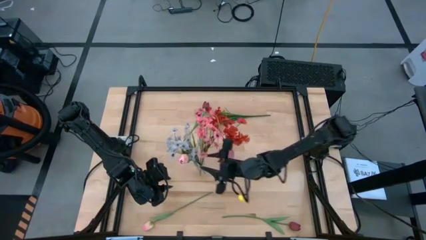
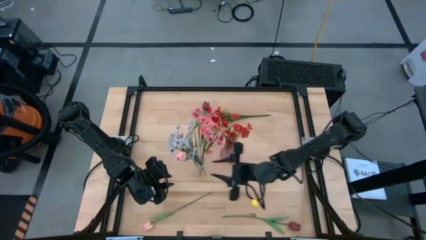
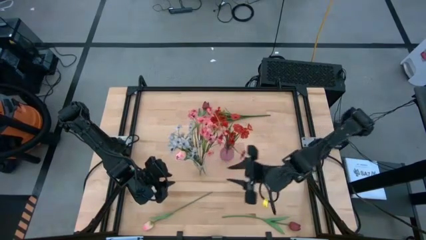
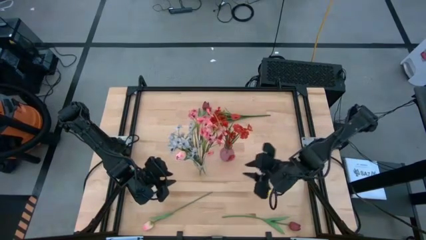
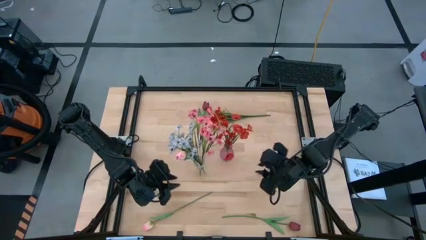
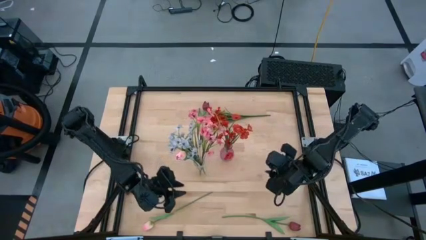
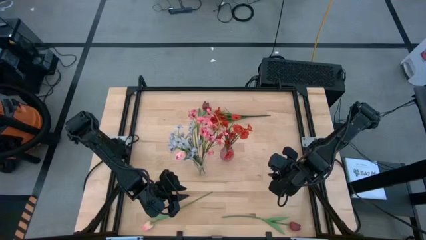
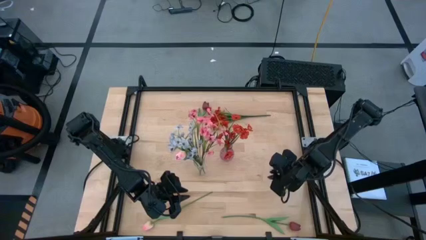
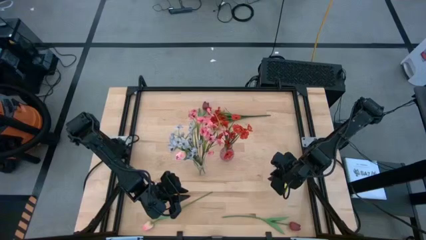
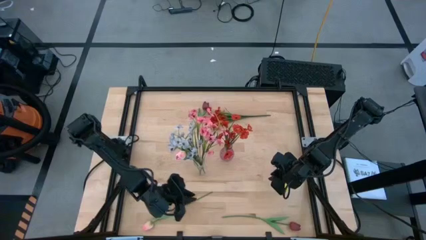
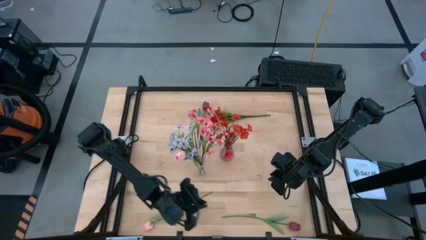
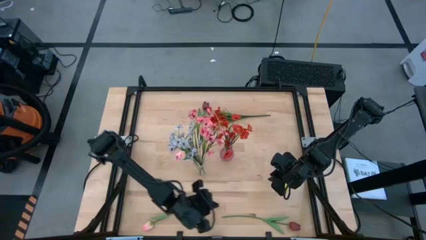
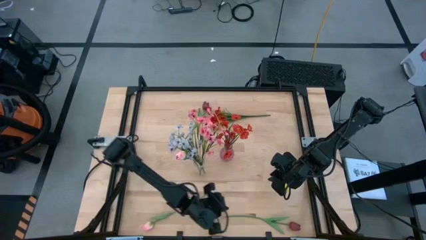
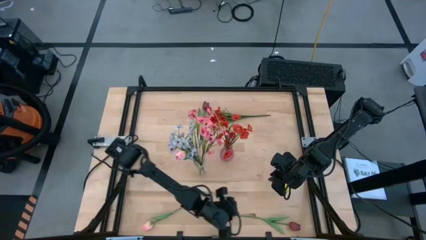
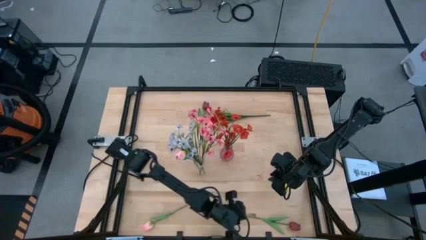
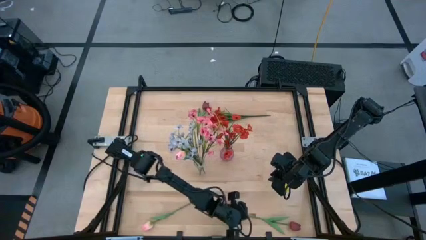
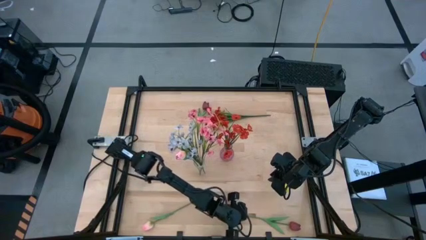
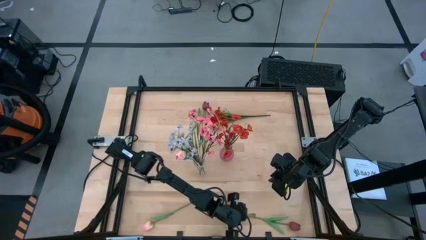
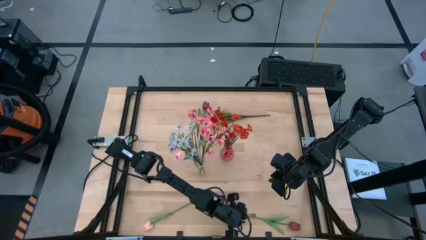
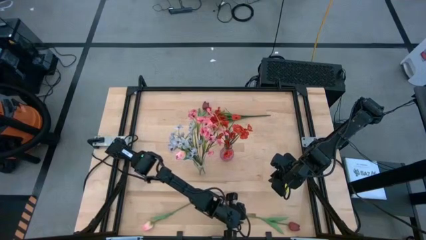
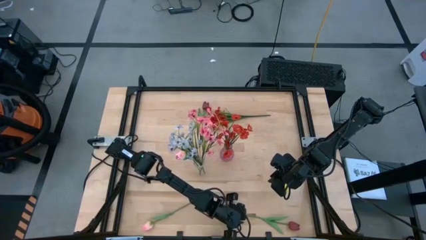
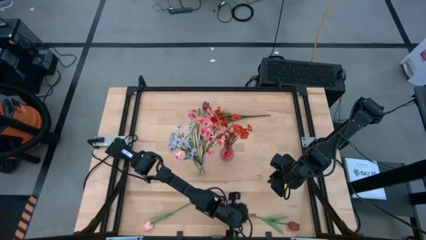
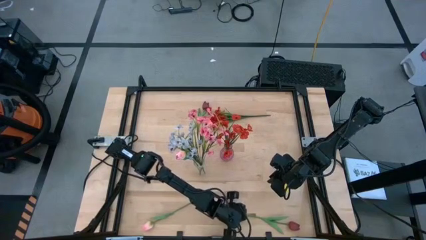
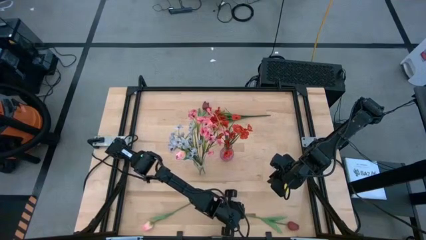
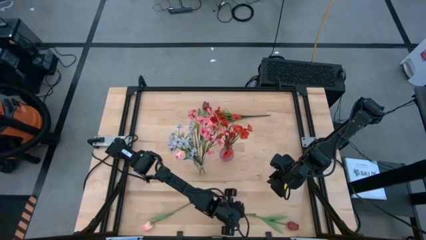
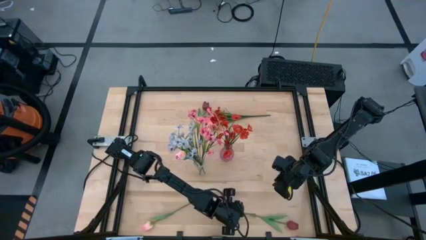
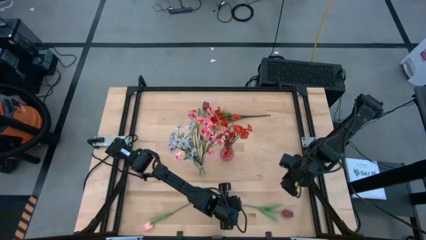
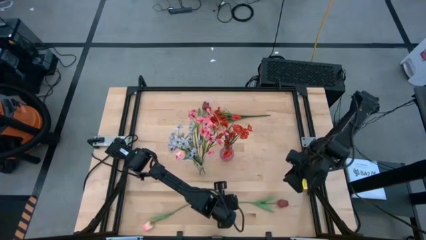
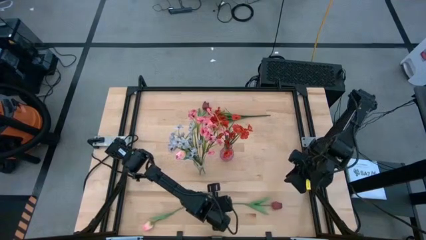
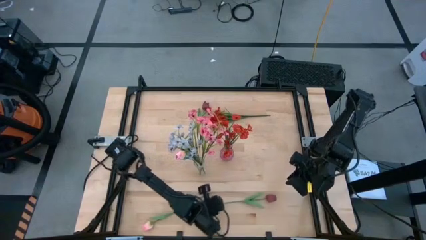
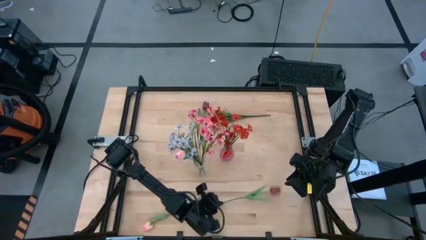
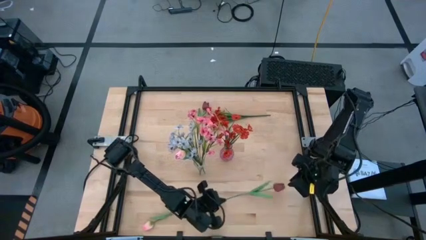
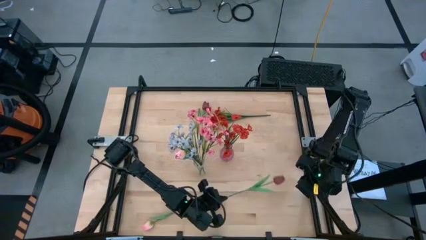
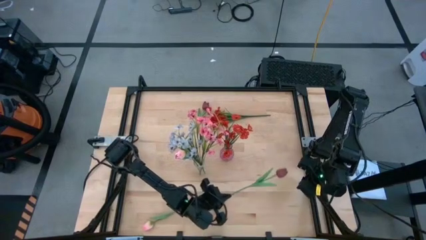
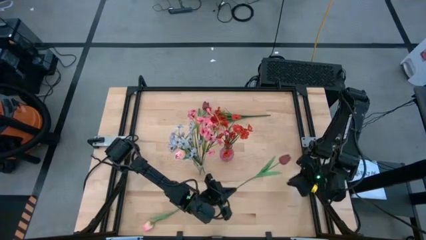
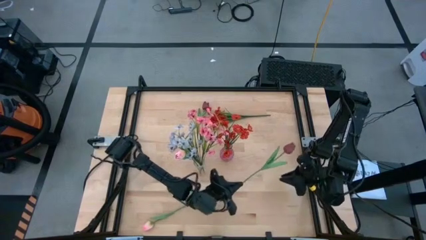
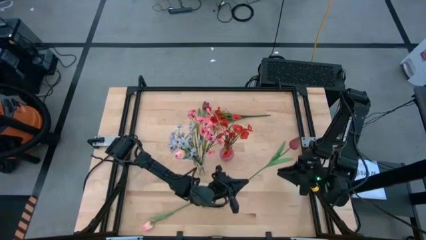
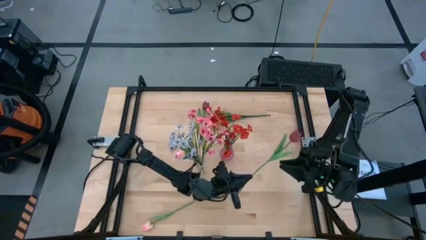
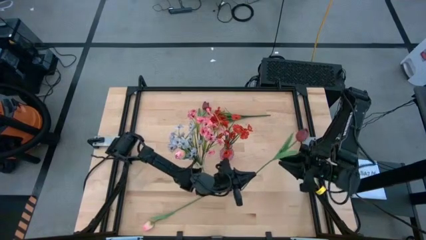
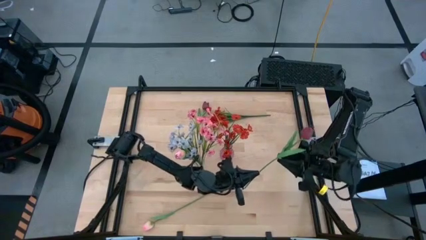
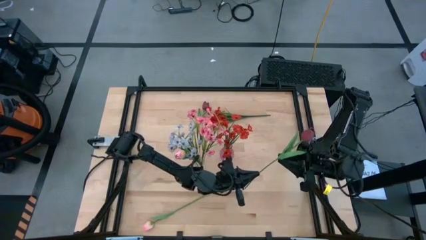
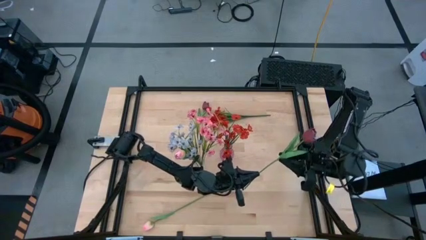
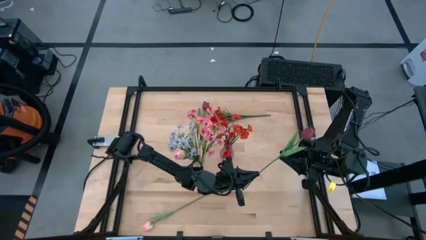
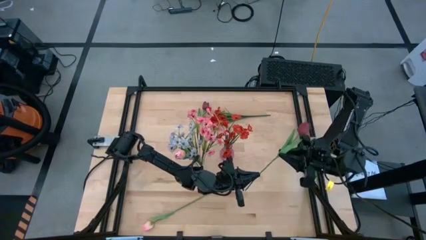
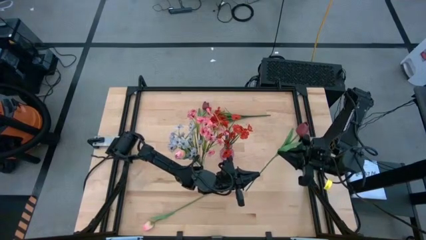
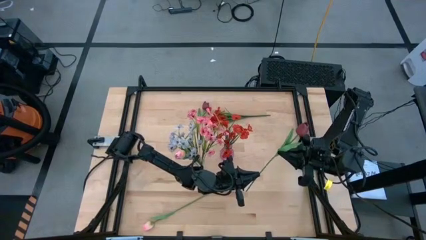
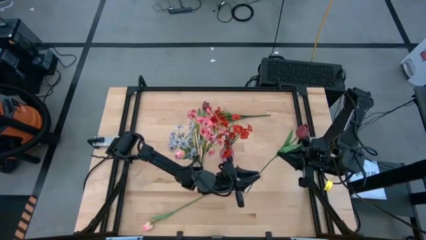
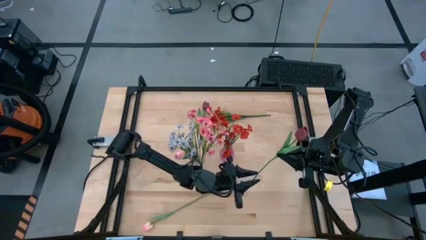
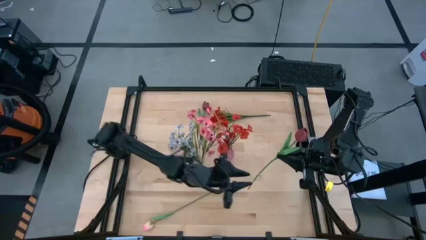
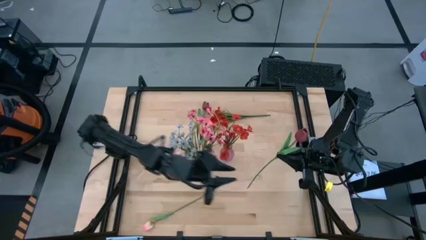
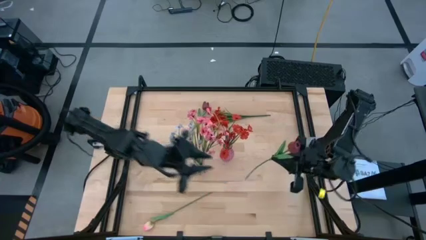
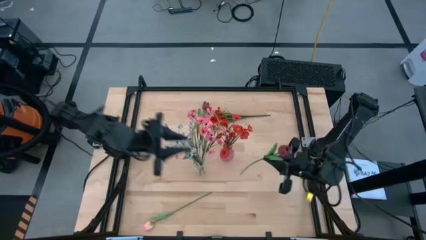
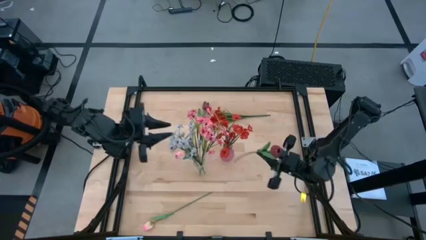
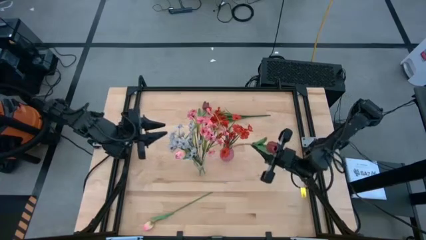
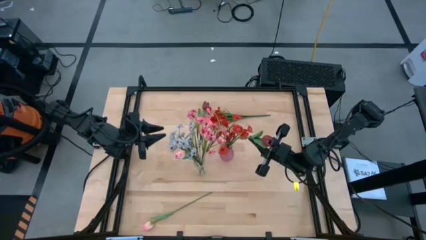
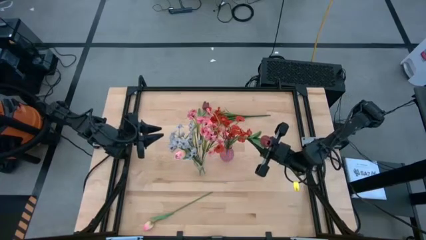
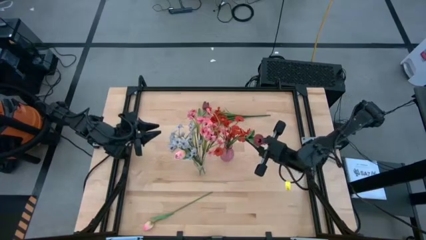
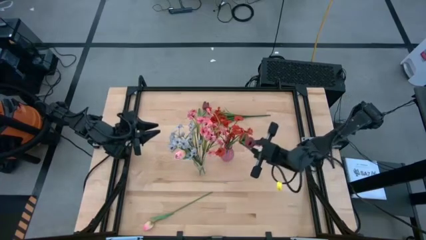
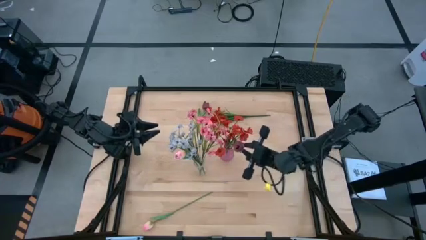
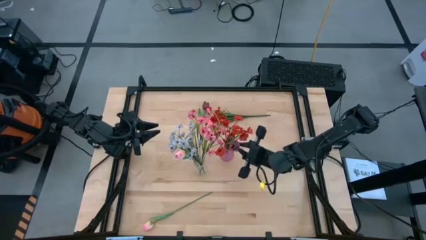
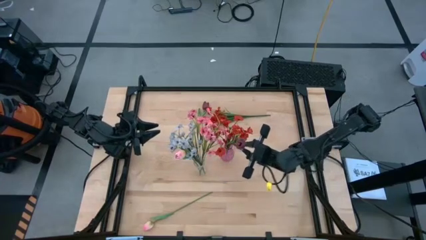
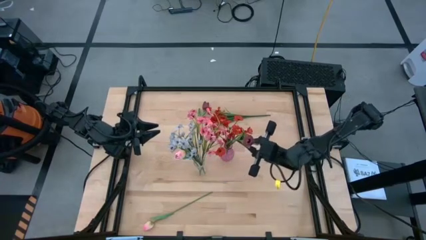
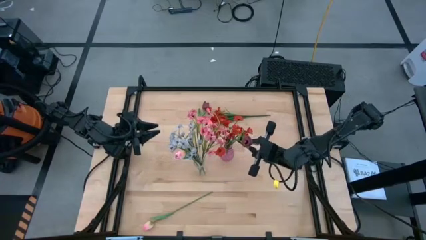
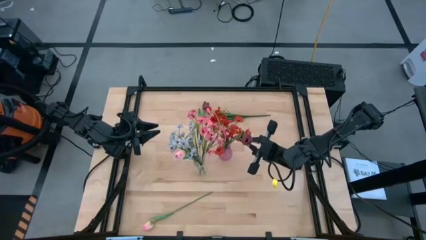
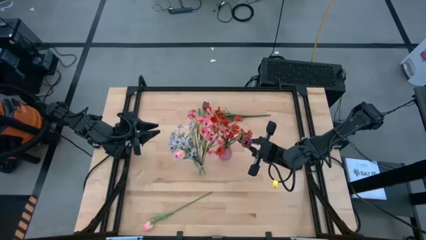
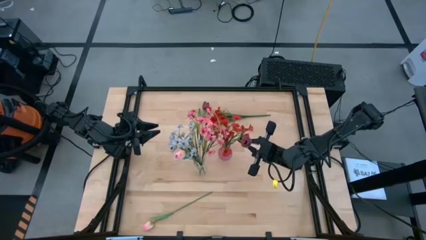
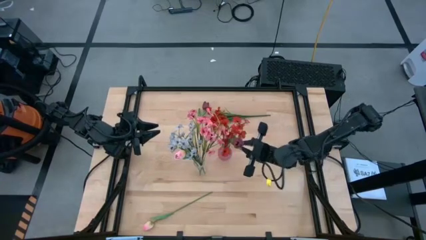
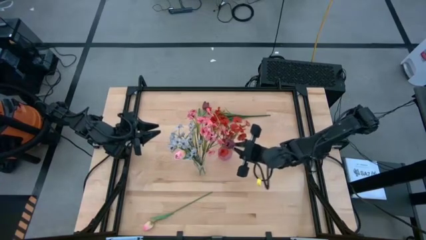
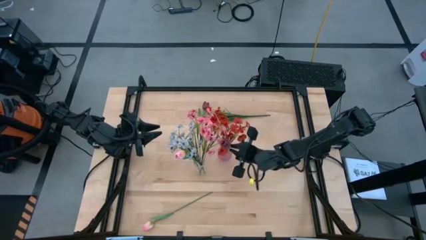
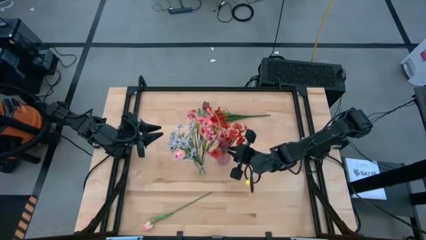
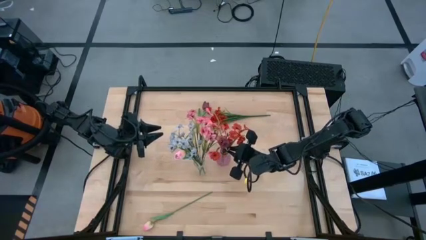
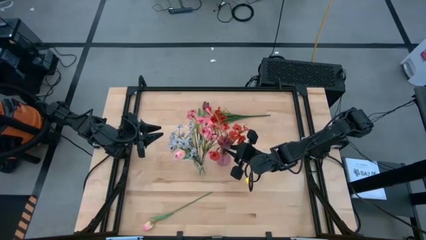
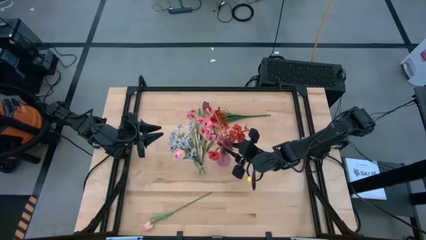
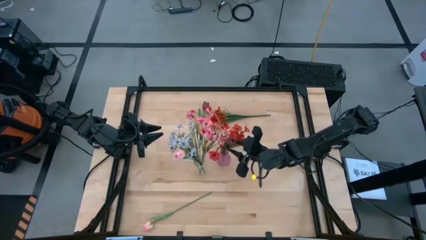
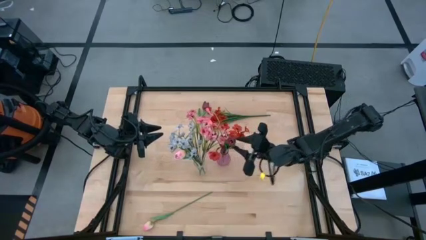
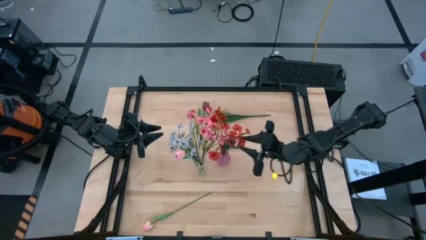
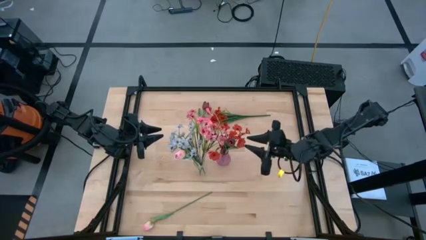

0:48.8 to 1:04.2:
Task: Sort flowers into vase by color
Put the bottom dark red flower into the purple vase
